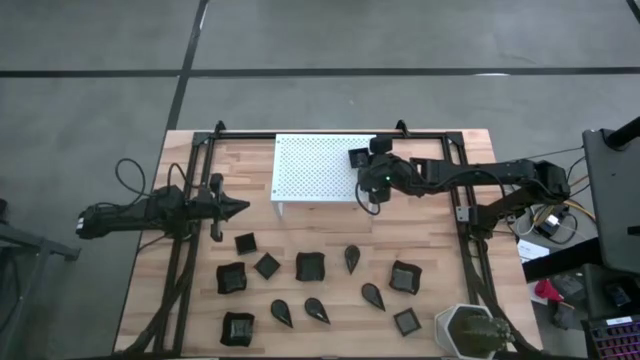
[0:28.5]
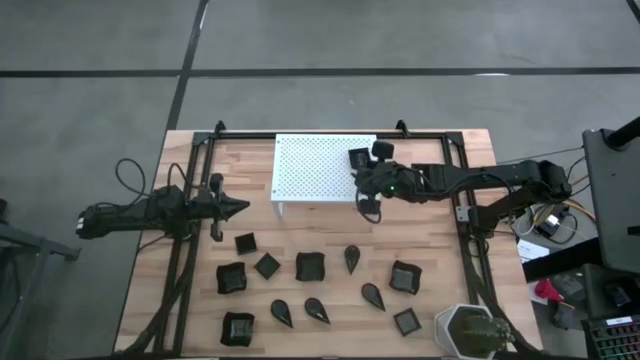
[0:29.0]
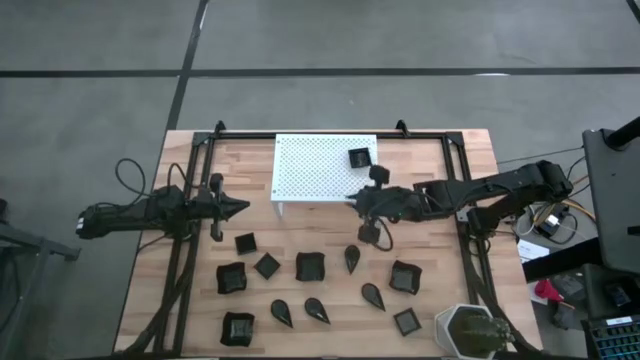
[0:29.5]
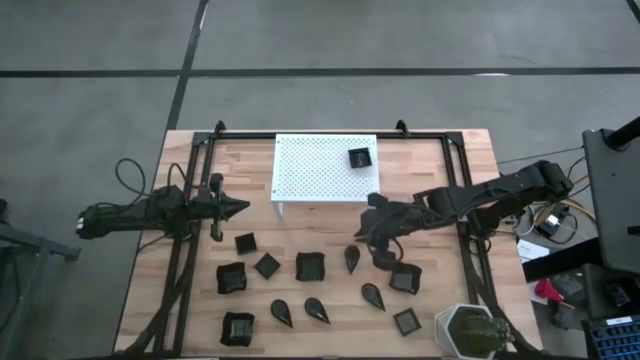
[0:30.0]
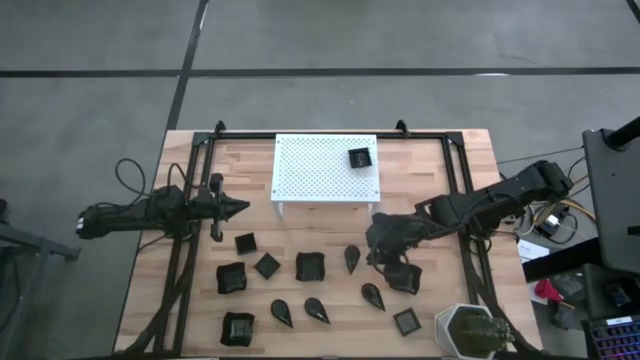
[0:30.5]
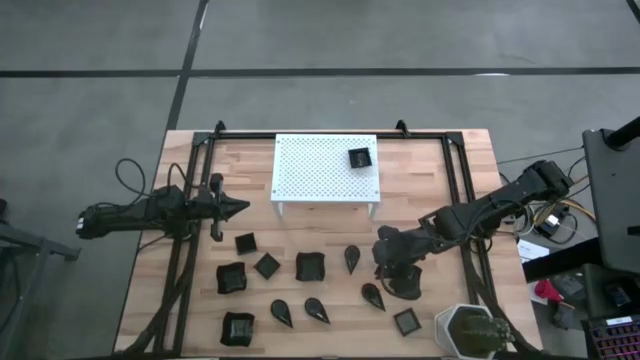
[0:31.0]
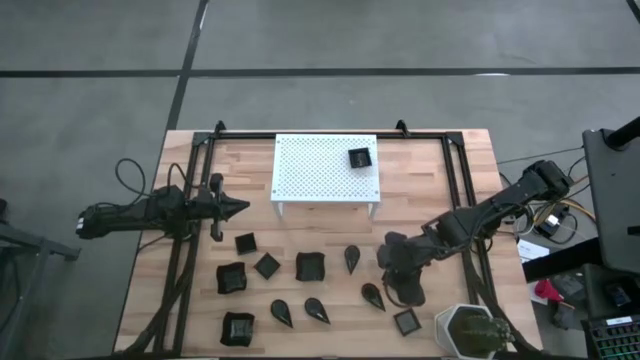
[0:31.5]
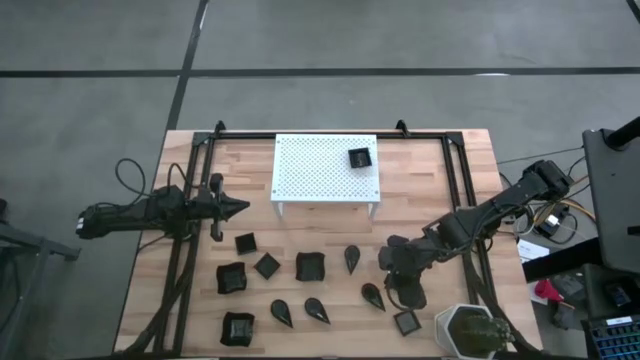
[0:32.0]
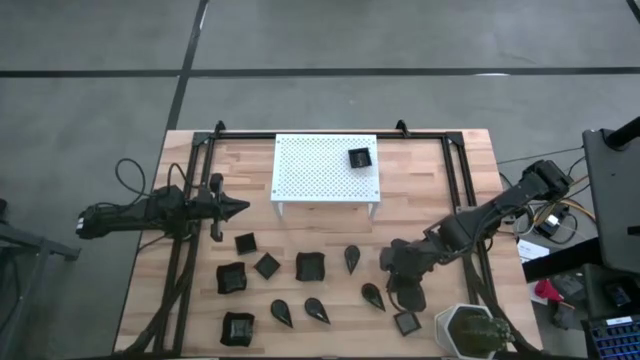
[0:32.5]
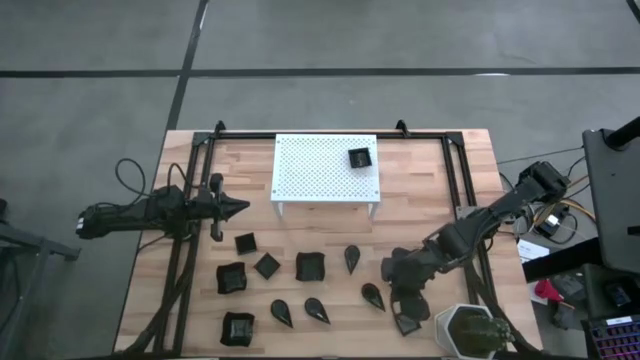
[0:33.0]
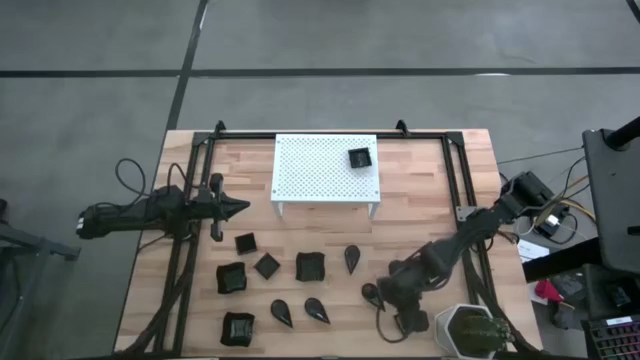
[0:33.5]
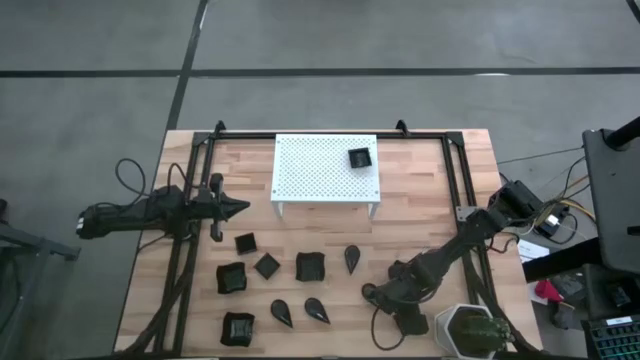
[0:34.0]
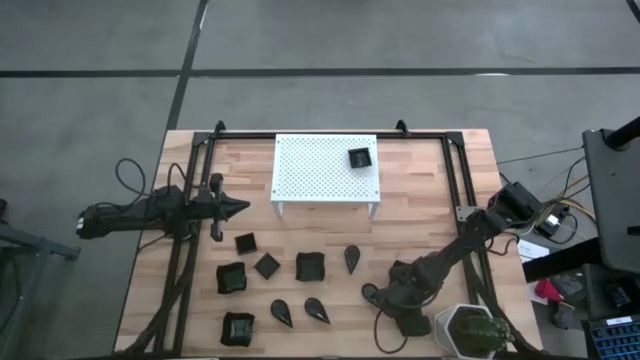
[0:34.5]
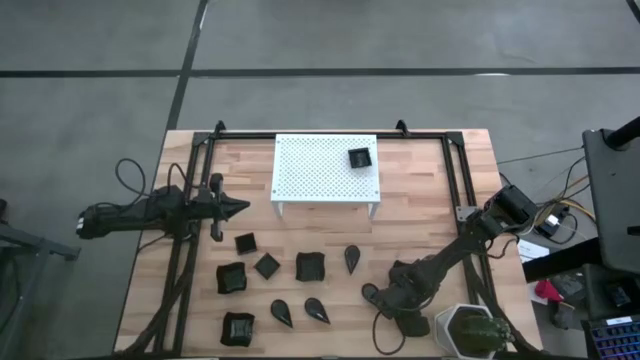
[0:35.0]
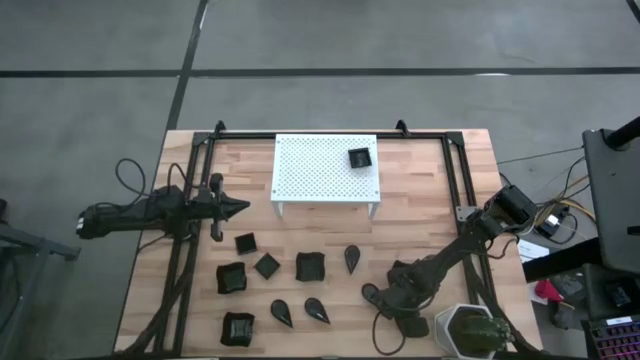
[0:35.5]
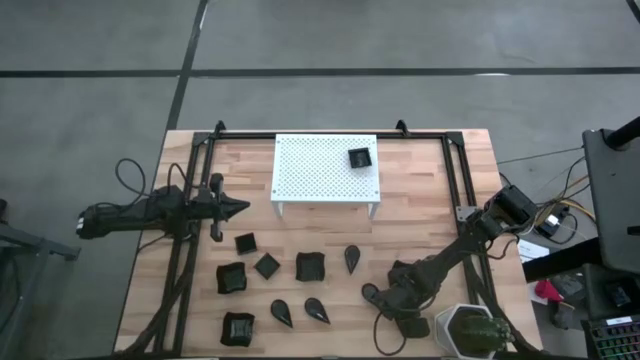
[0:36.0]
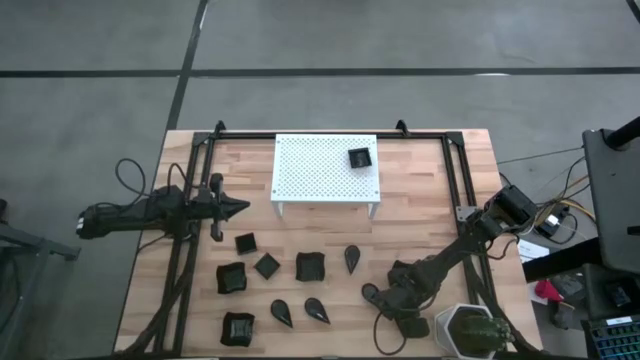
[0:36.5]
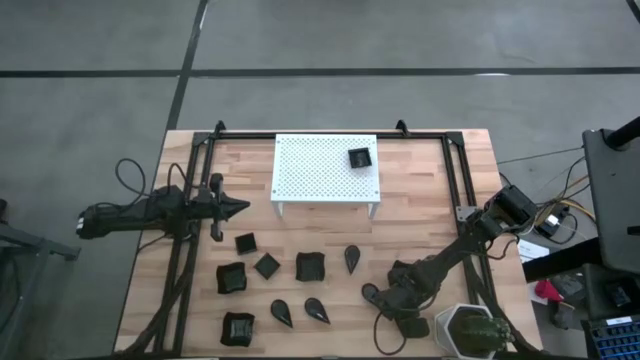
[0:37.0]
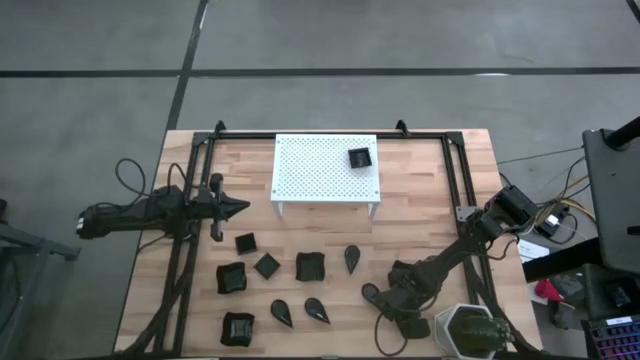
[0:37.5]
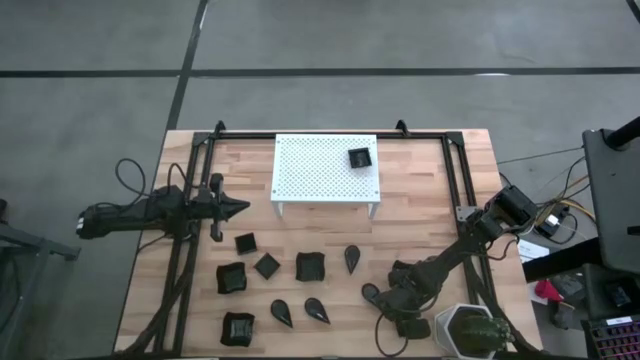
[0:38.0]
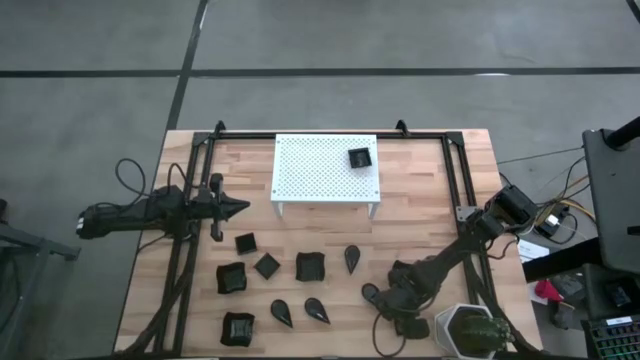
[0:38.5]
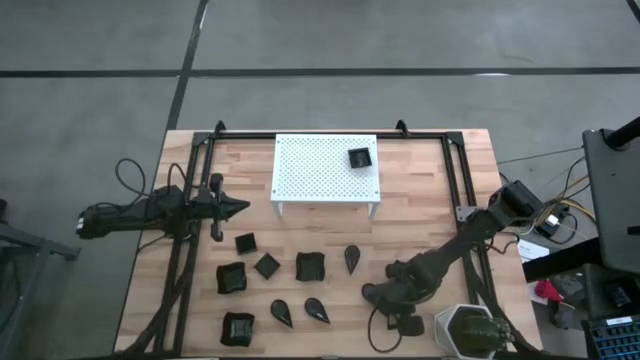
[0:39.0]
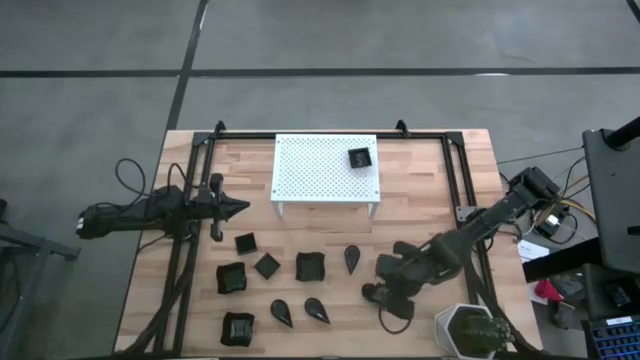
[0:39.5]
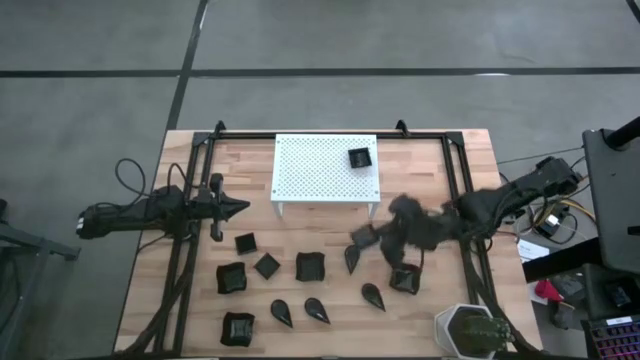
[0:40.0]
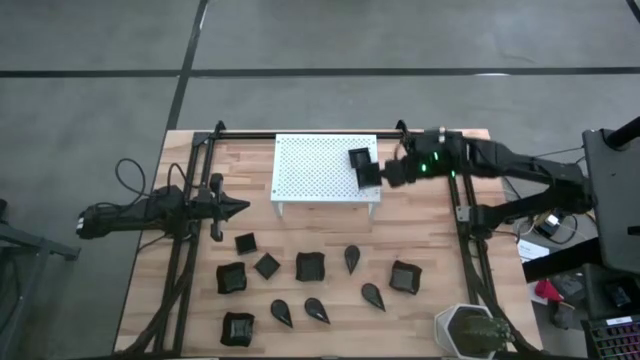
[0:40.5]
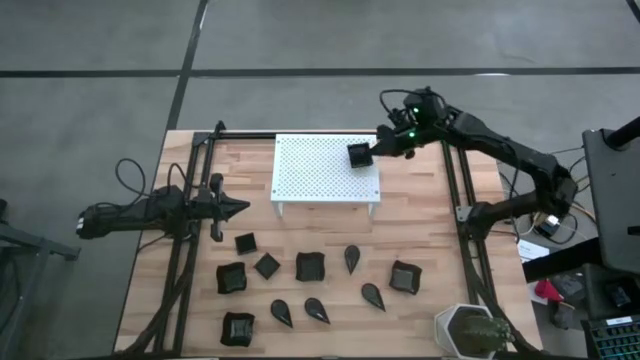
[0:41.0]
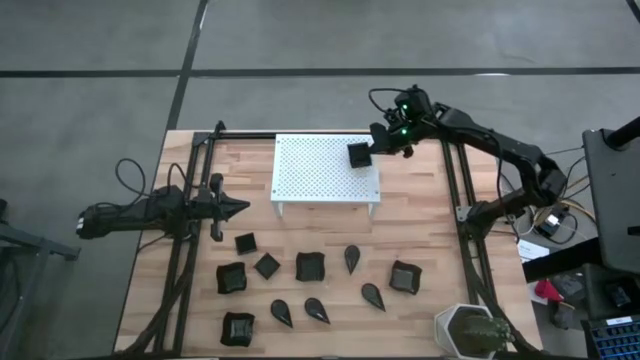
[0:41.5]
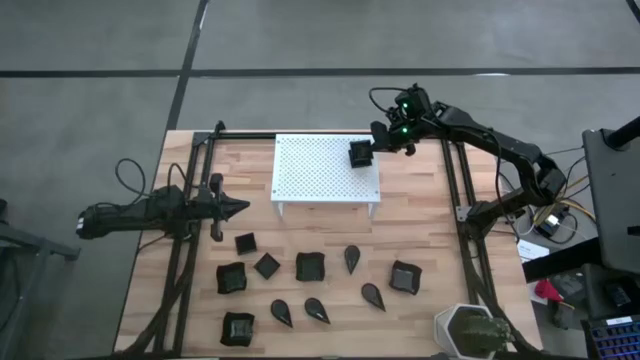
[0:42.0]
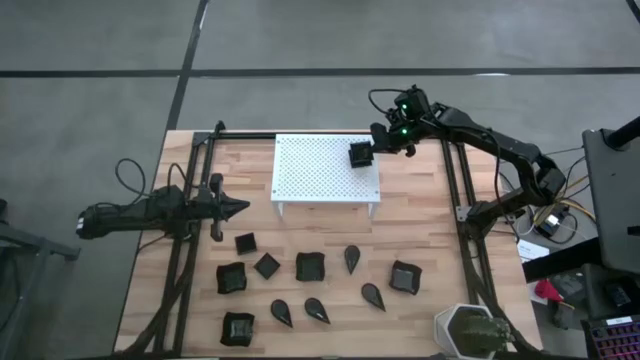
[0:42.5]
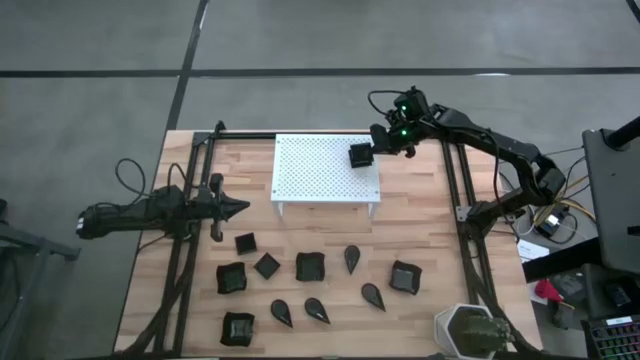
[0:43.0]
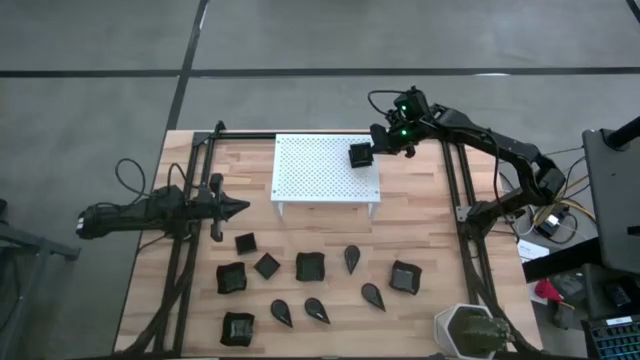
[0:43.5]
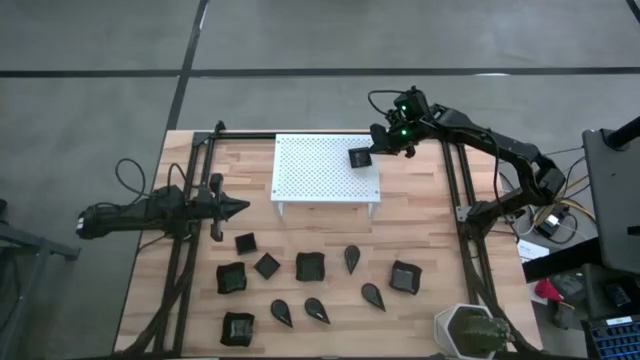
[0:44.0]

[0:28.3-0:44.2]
Task: Pick & Place Mini shaped plates
Stack the square plate on top of the square plate on the shelf

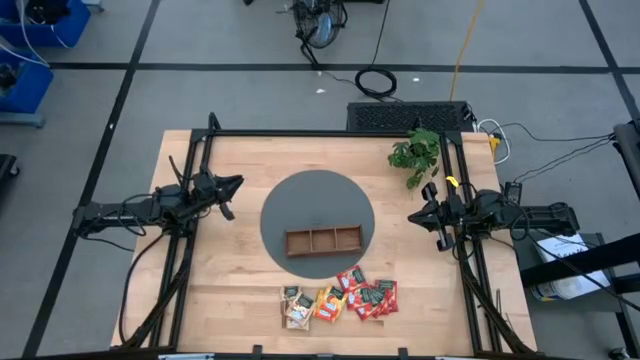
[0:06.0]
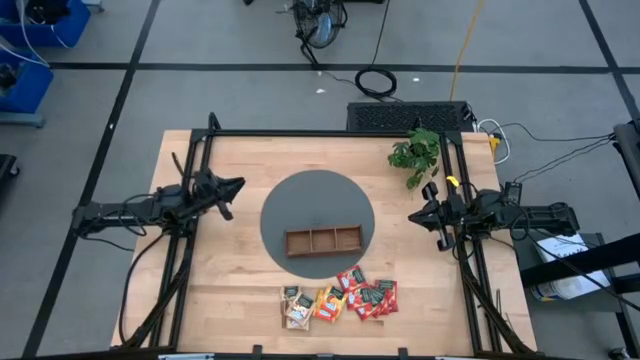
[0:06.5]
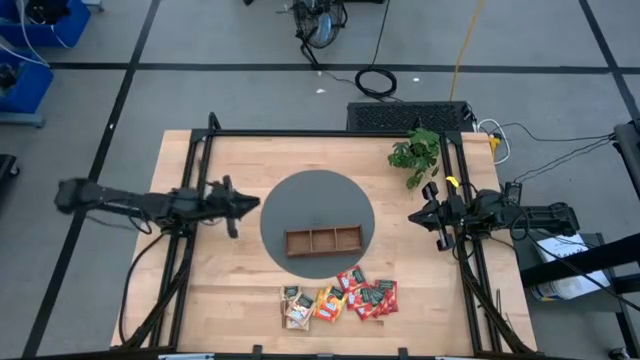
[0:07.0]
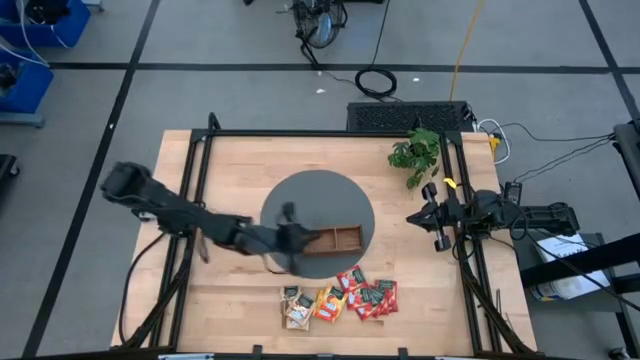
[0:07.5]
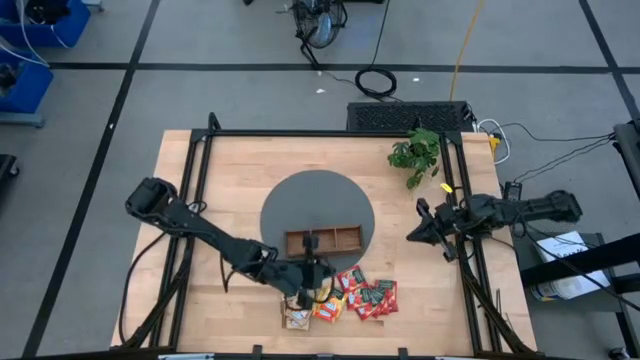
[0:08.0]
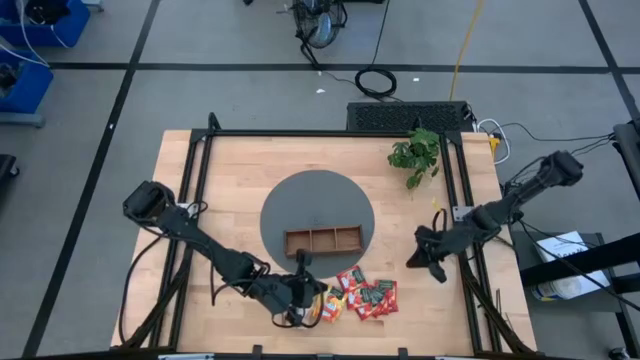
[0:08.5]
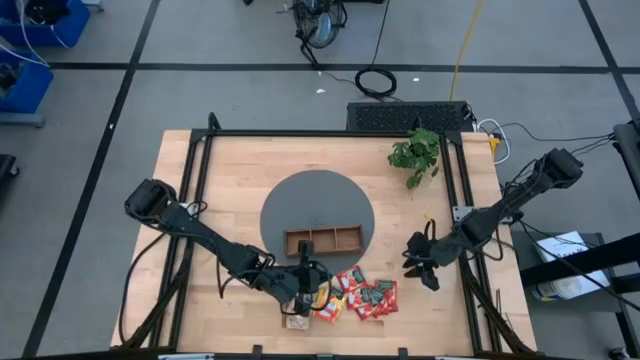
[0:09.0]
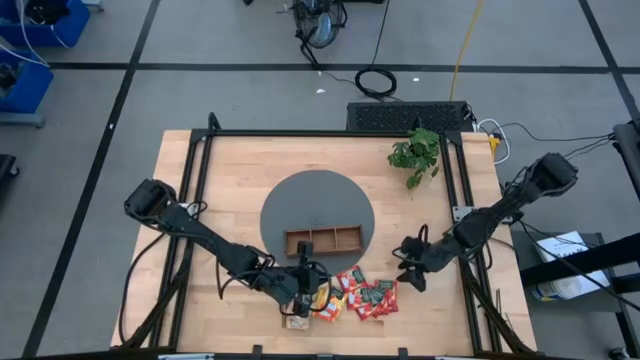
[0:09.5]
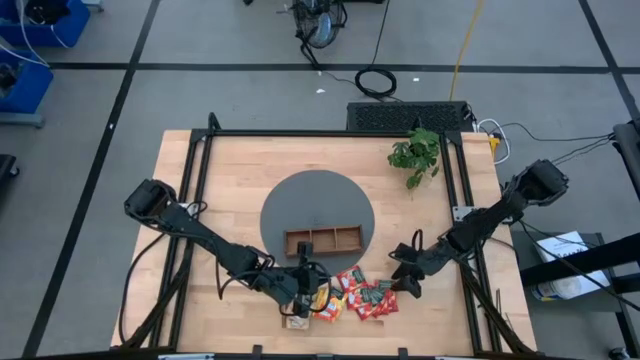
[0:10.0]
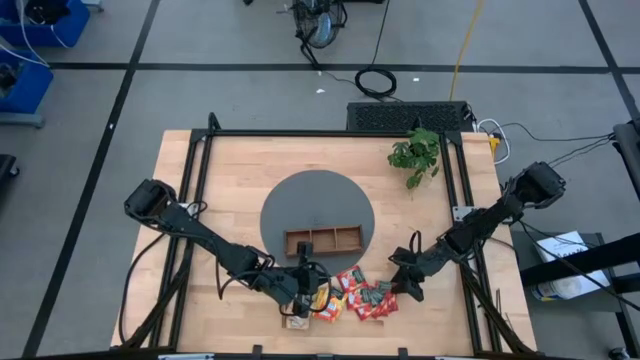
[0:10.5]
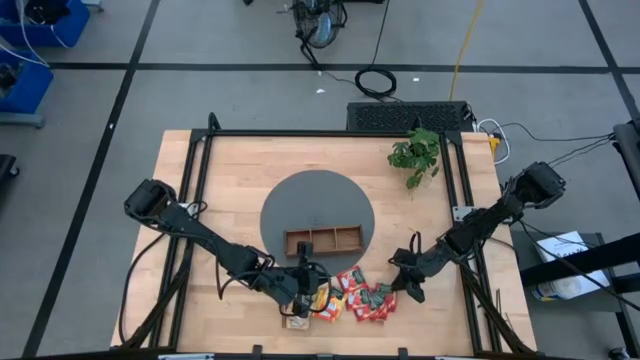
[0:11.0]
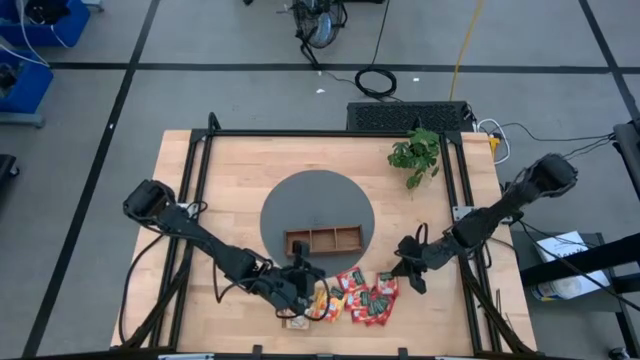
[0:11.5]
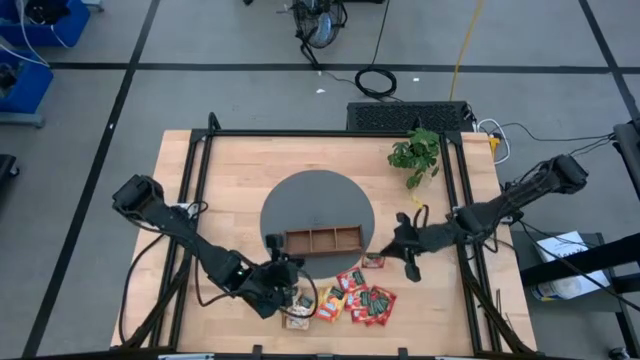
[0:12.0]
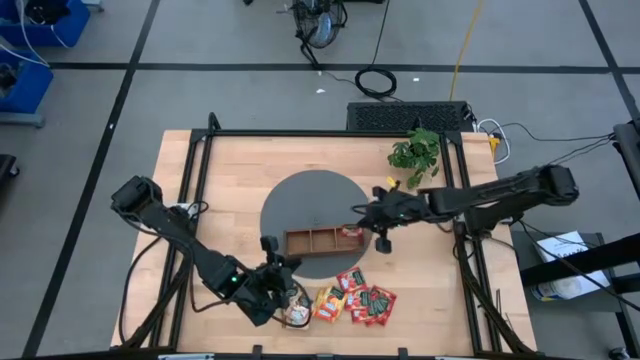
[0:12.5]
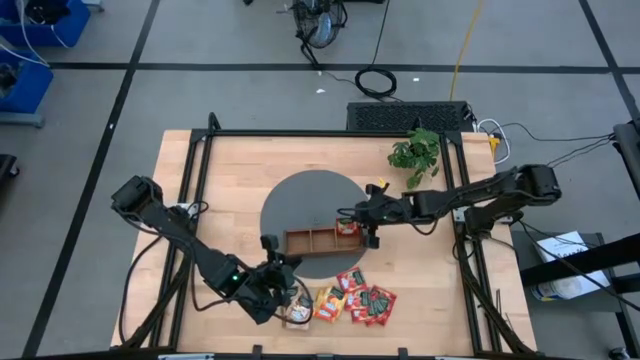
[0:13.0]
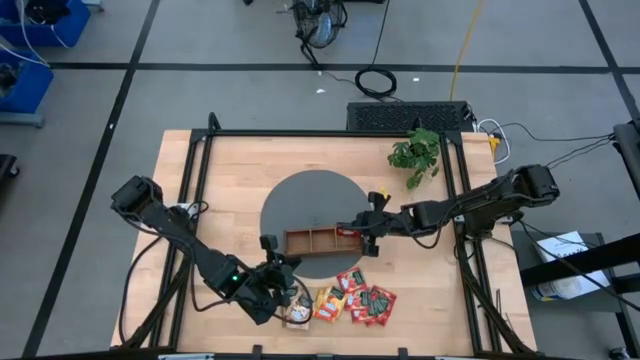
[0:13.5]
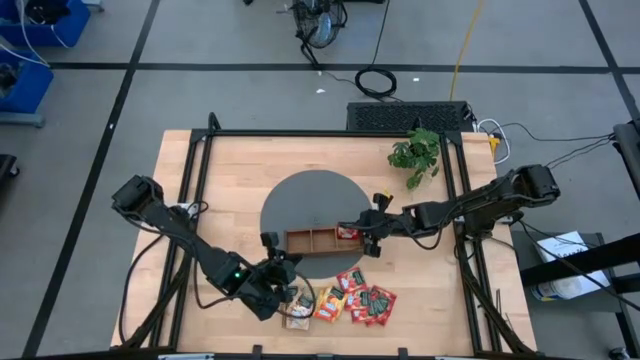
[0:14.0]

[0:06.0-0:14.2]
Task: Pick & Place Tea
Put the strawberry tea sachet into the right compartment of the wooden organizer
